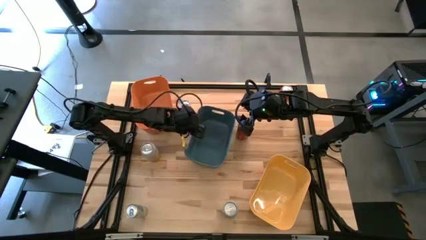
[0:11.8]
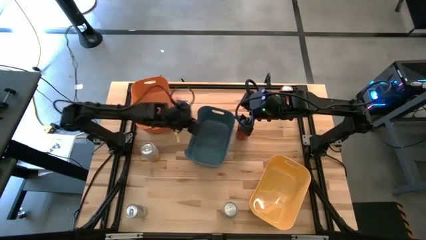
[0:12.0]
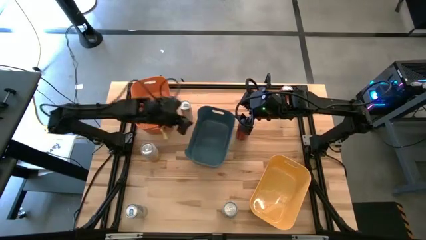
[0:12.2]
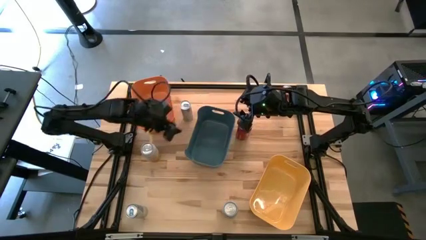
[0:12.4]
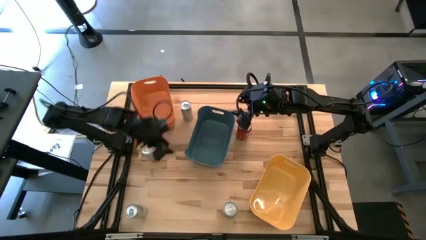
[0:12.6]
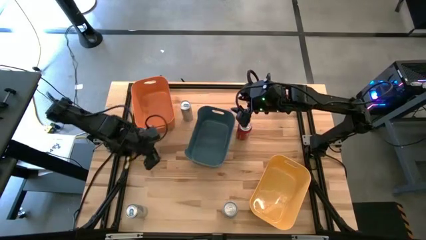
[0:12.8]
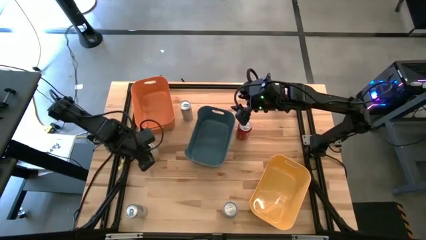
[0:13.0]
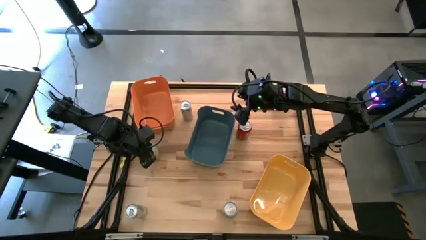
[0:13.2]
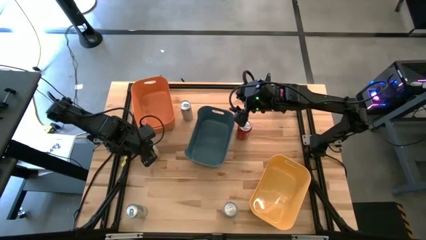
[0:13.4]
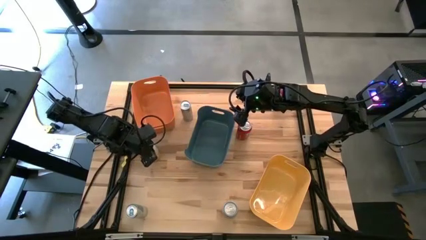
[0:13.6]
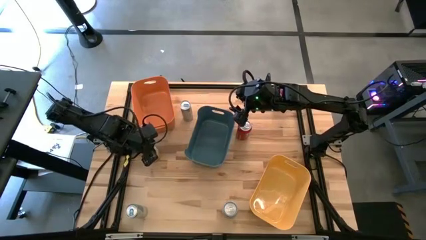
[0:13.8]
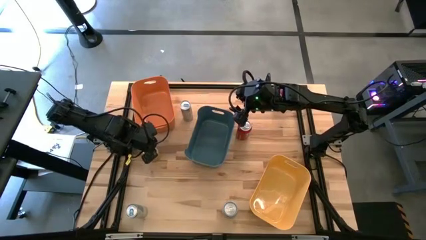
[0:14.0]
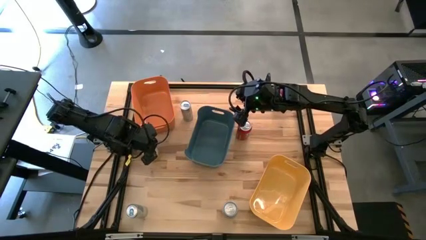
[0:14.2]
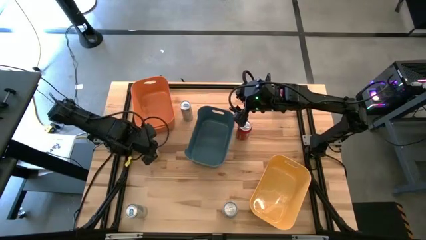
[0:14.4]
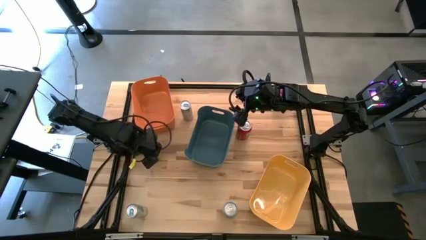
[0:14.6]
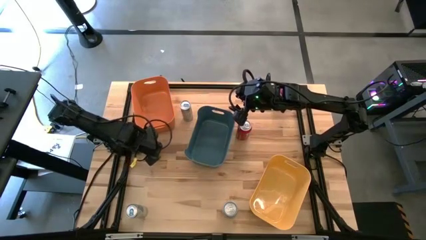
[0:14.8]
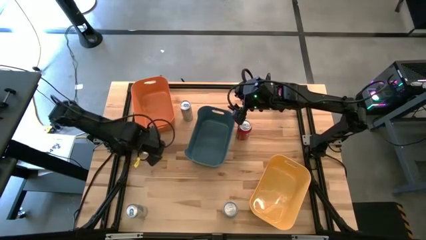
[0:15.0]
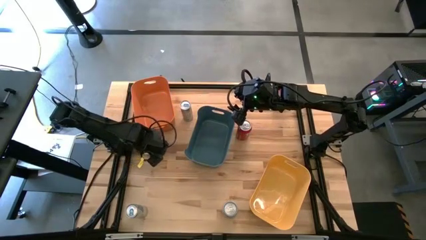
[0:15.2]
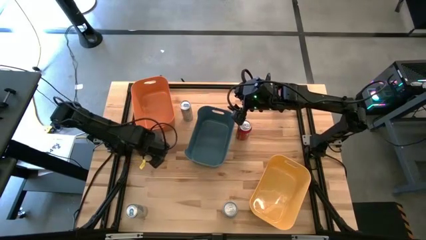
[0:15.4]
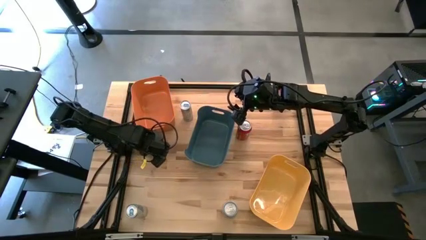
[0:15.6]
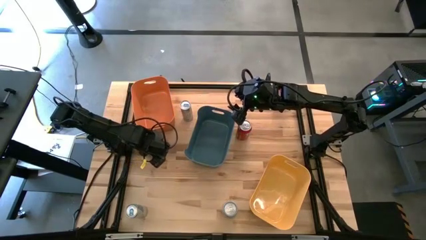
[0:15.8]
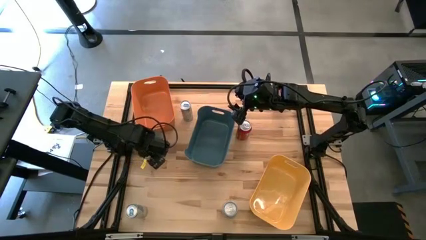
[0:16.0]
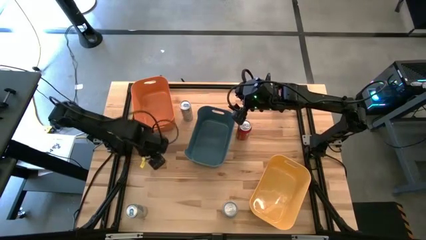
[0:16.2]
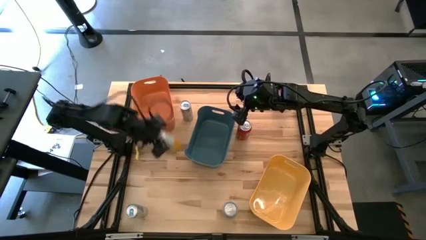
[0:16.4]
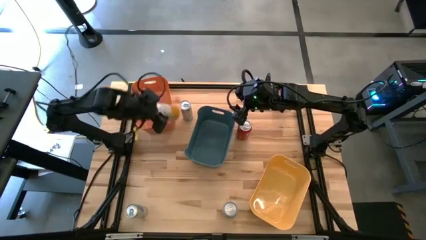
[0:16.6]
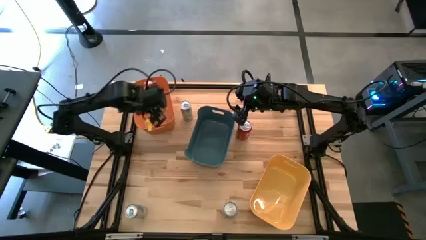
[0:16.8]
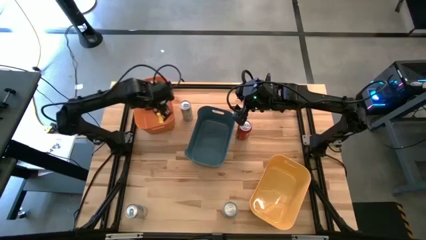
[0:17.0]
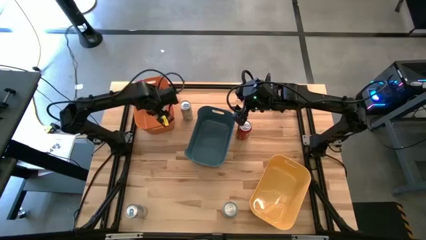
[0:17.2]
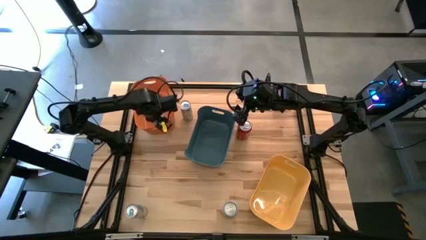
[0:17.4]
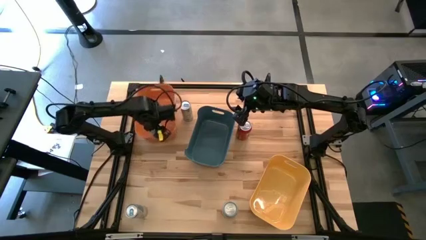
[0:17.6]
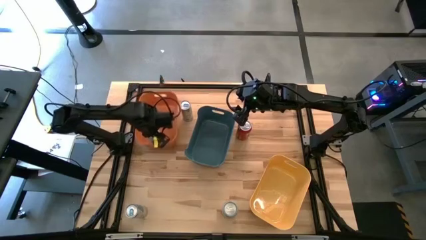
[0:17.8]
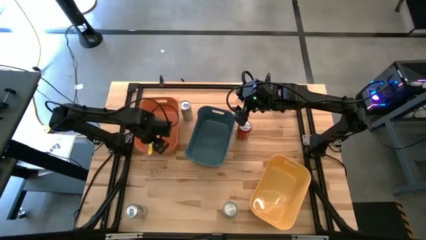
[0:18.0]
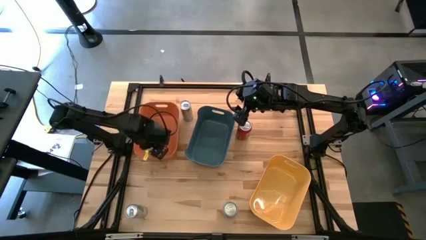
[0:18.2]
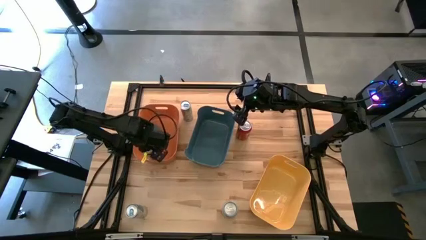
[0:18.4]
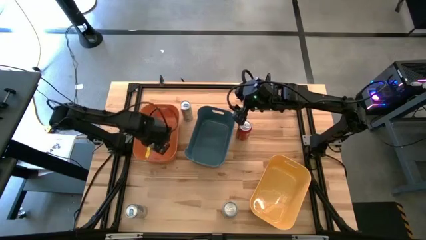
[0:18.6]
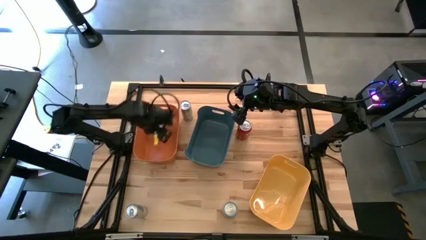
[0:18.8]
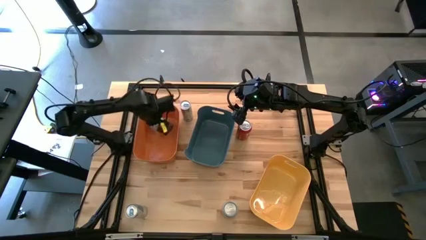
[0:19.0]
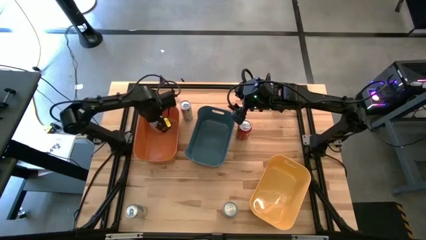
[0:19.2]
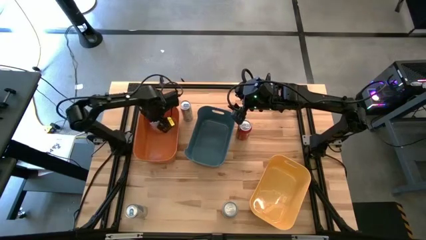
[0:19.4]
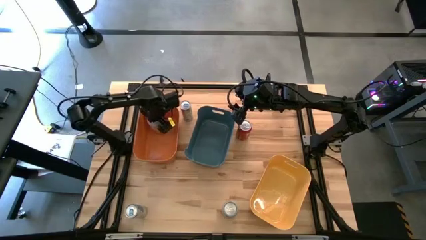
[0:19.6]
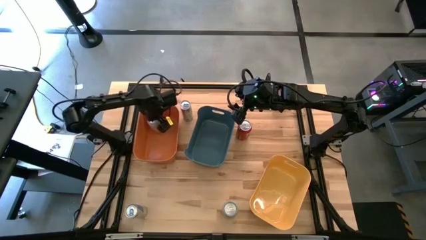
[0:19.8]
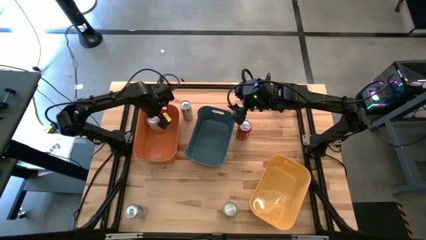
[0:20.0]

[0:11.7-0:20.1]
Task: Sort soda cans
Put the top yellow-white soda can into the orange bin

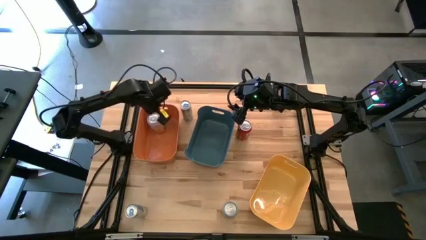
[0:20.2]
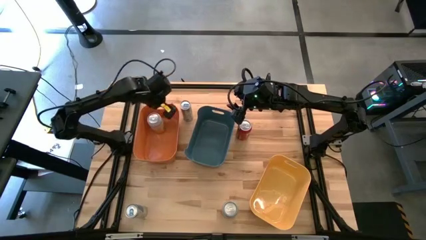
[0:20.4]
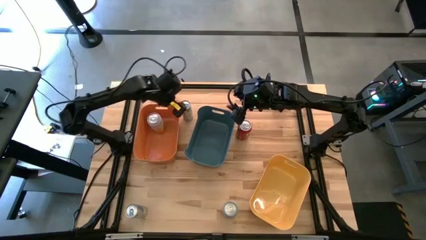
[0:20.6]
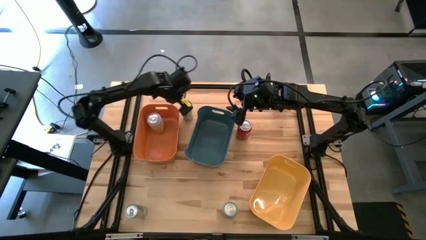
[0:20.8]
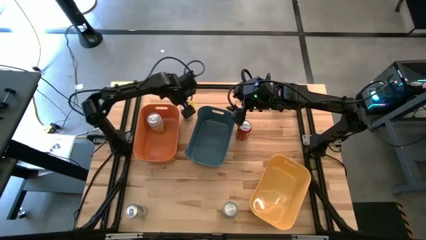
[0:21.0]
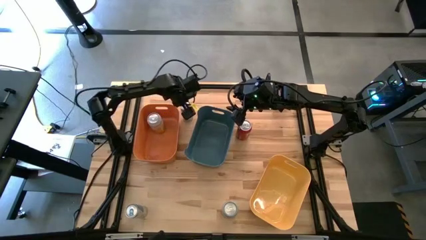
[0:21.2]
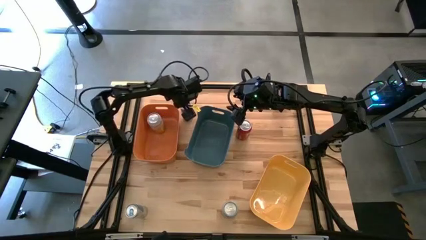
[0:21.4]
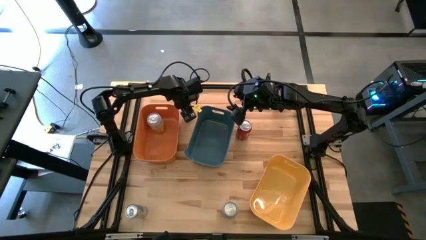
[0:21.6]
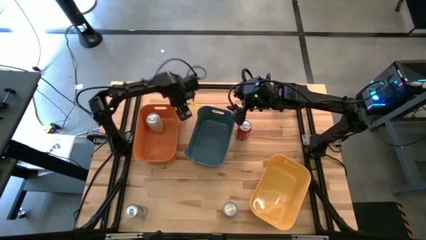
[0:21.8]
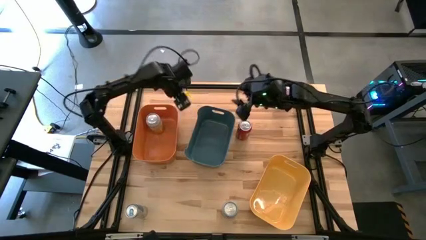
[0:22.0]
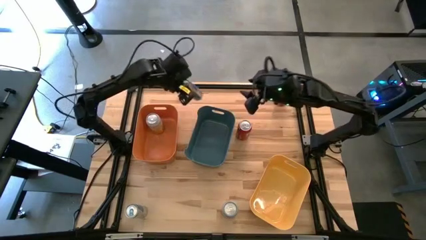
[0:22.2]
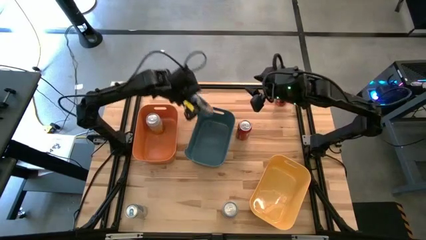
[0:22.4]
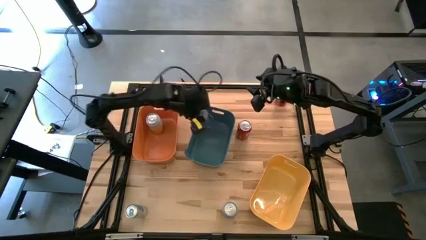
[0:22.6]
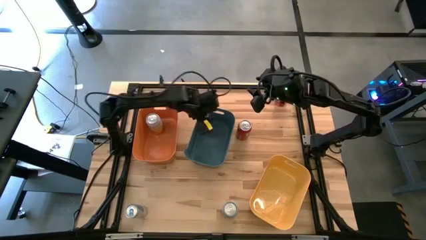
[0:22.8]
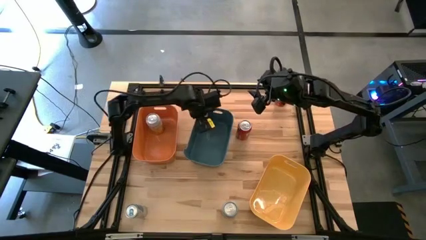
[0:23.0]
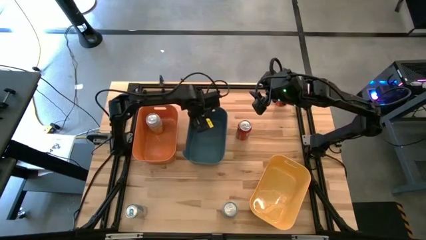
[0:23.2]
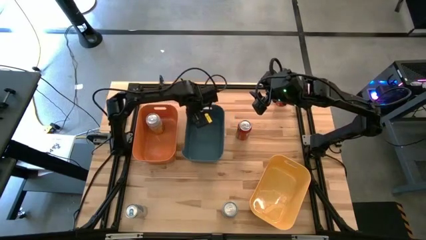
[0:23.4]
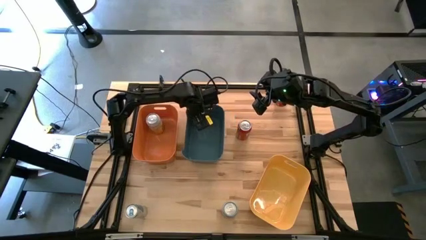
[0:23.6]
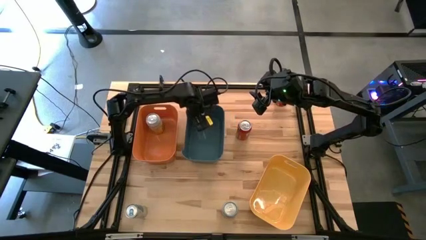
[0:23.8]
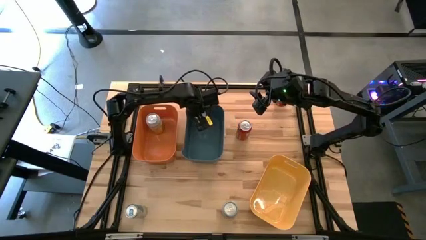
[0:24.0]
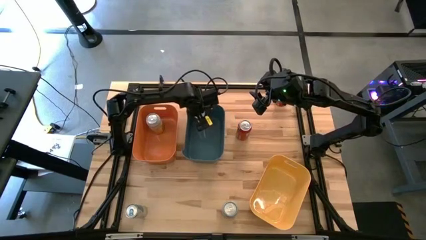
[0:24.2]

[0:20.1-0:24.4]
Put the top blue soda can into the blue bin

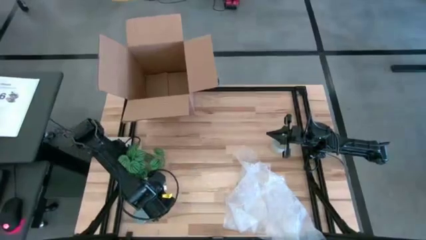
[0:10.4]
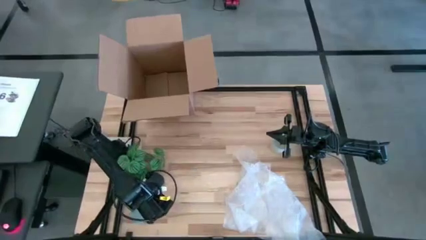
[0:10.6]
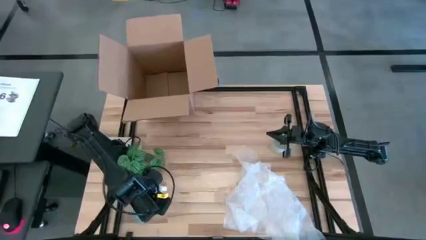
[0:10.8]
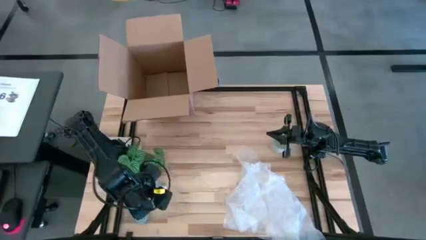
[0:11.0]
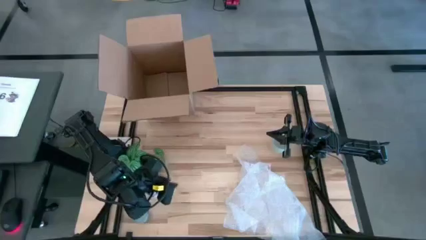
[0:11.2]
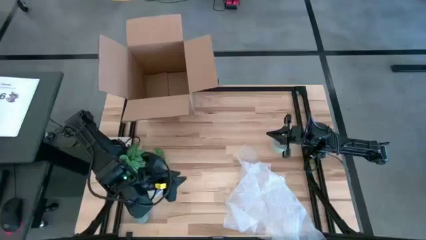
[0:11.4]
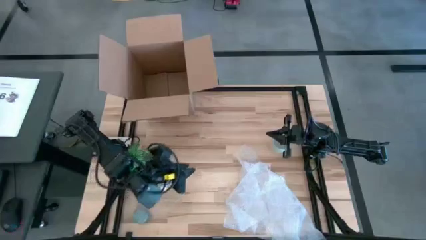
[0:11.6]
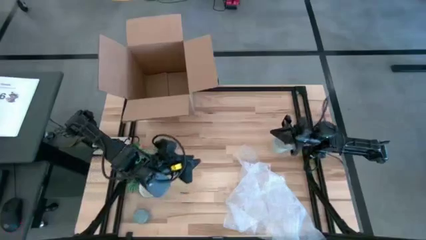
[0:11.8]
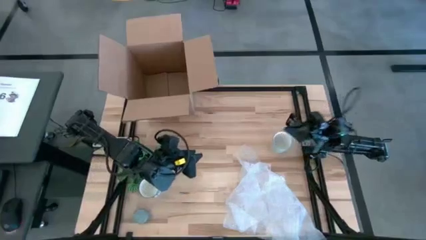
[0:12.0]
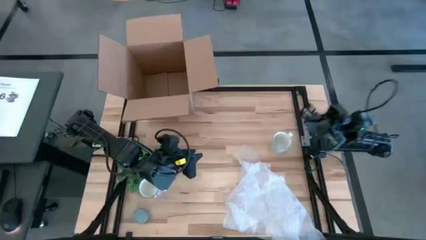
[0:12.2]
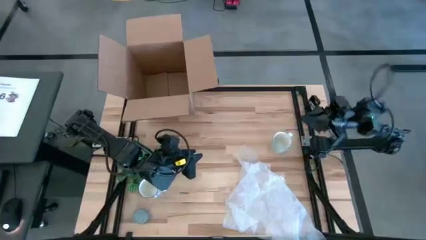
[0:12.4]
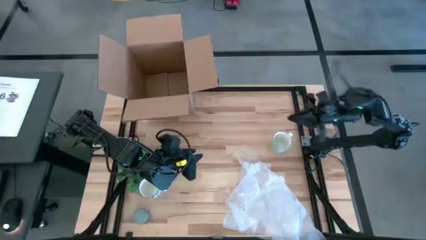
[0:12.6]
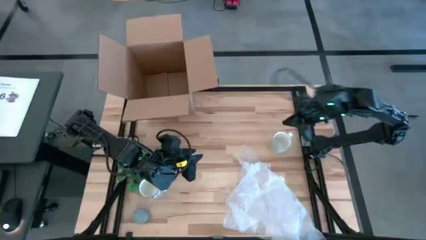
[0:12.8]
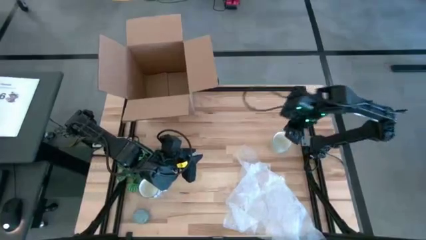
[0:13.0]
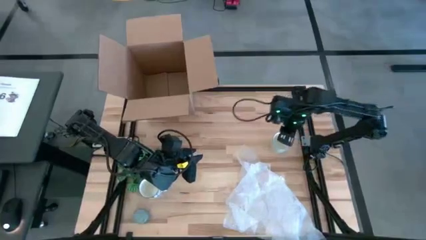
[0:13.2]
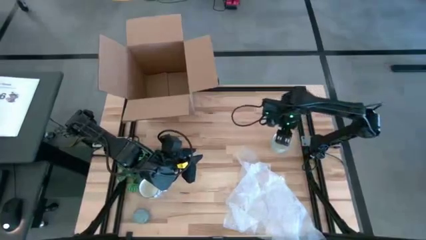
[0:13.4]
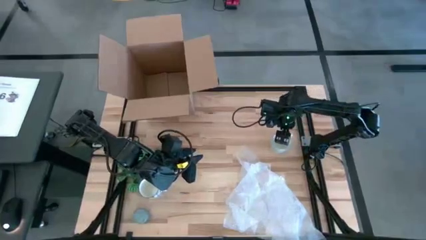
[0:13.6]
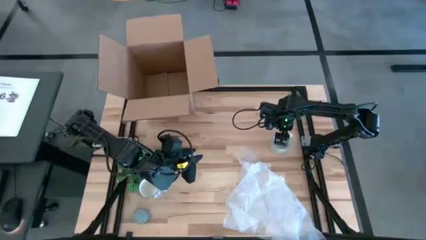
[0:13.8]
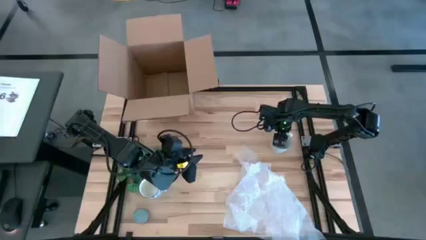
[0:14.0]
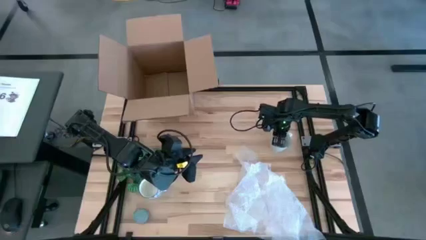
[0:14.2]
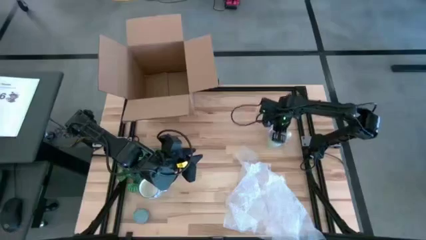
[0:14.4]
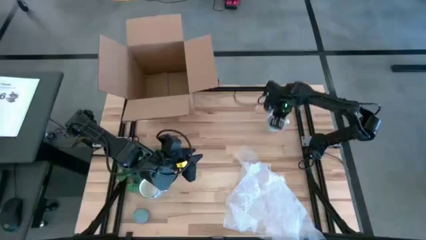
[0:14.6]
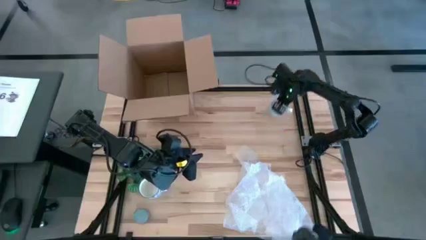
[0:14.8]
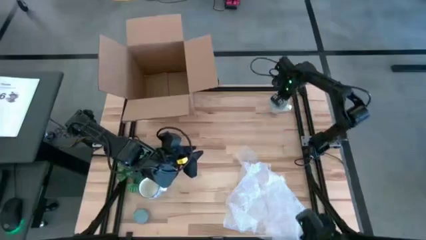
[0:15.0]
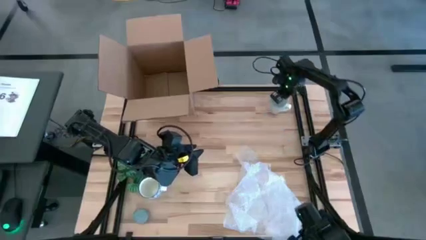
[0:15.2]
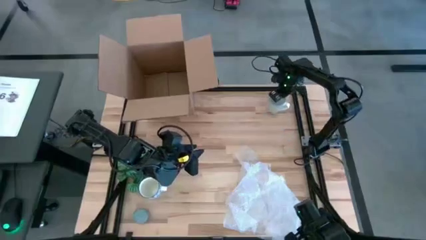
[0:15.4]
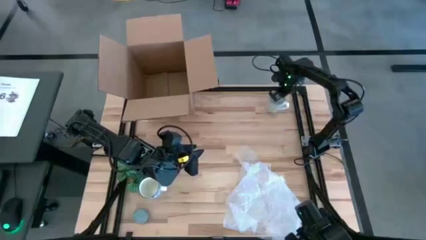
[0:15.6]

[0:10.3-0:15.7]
Task: wrap mug
Move the green mug to the top right of the table
